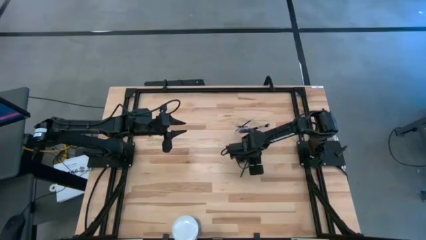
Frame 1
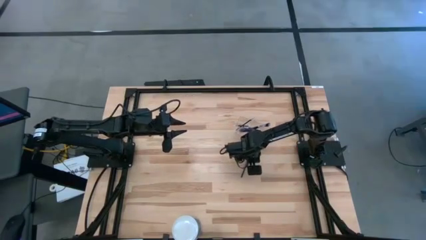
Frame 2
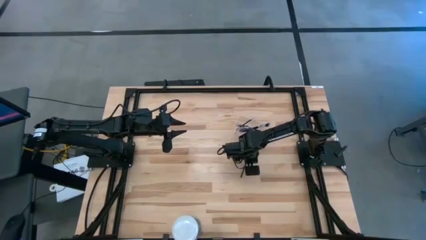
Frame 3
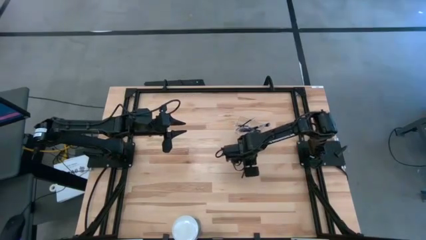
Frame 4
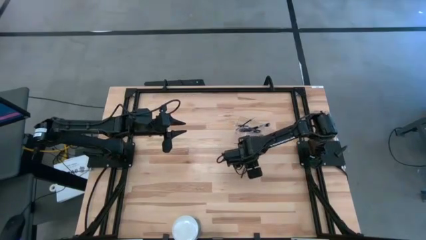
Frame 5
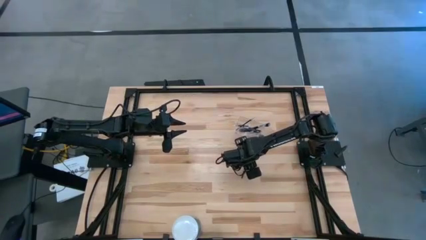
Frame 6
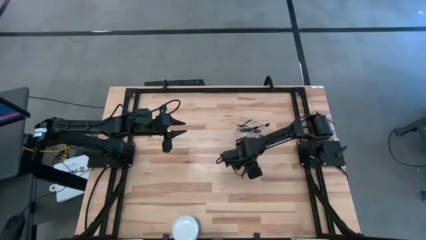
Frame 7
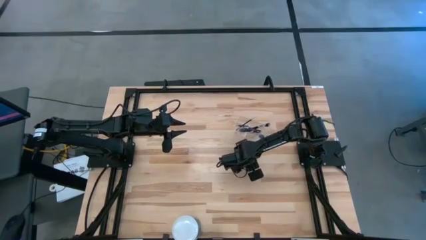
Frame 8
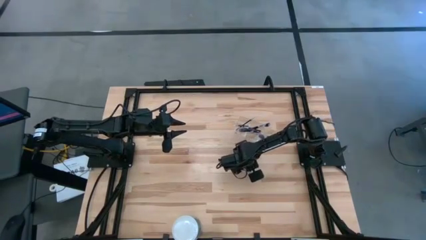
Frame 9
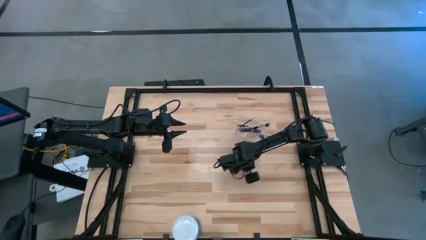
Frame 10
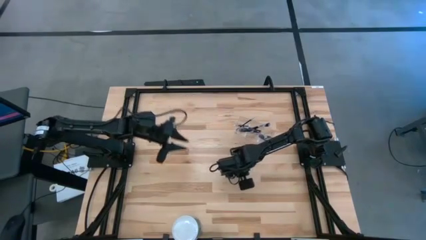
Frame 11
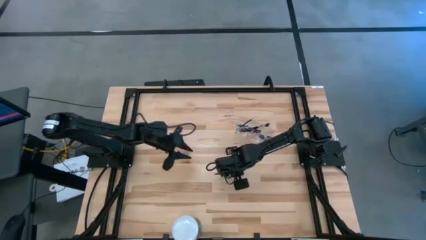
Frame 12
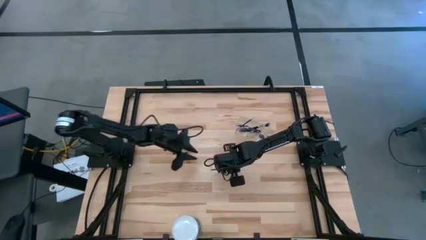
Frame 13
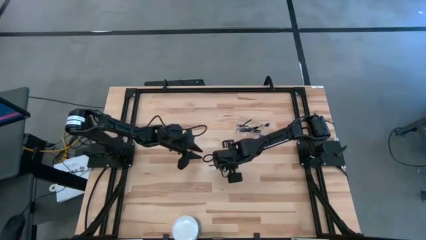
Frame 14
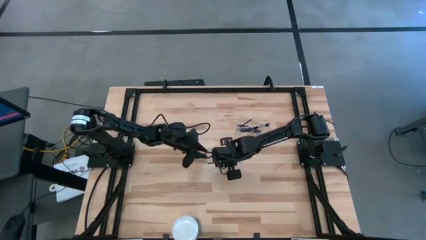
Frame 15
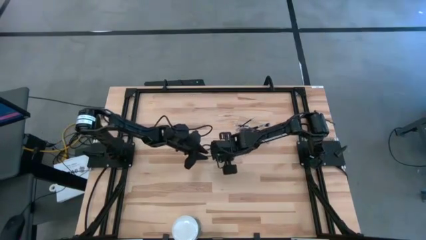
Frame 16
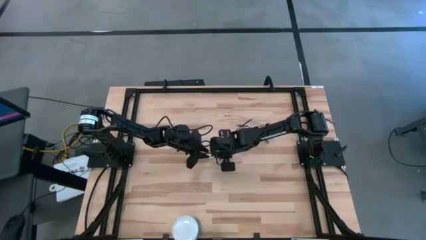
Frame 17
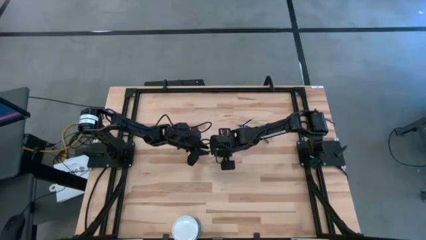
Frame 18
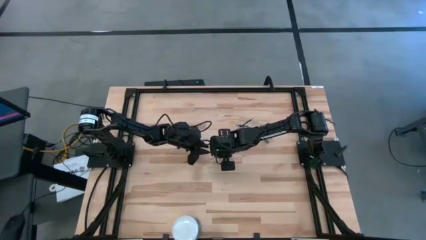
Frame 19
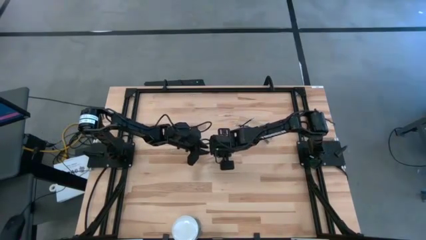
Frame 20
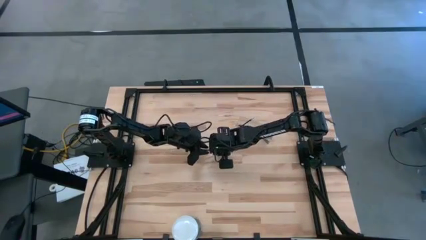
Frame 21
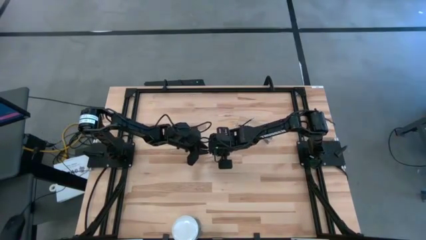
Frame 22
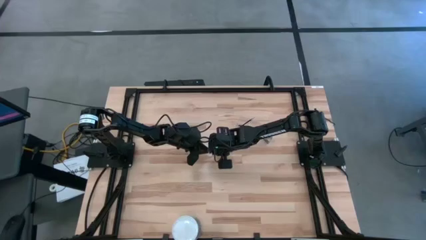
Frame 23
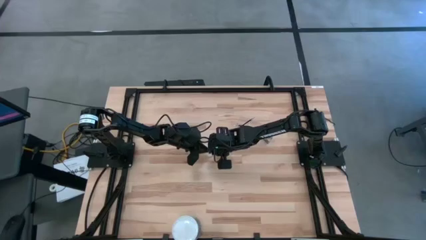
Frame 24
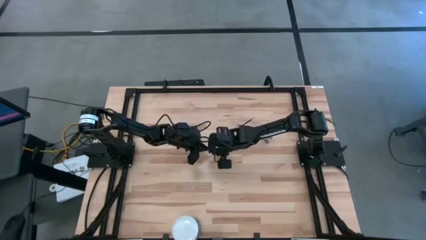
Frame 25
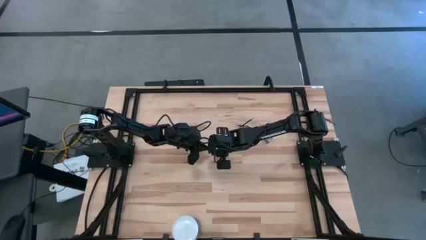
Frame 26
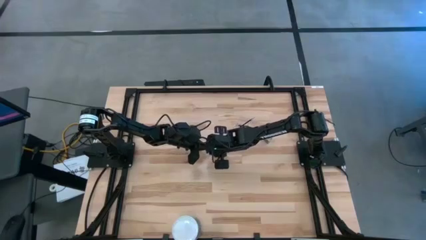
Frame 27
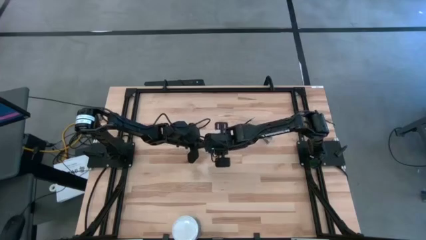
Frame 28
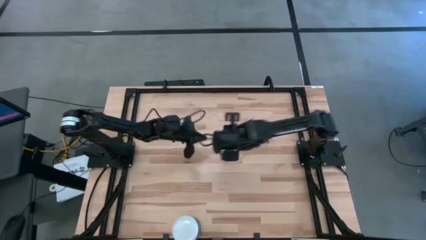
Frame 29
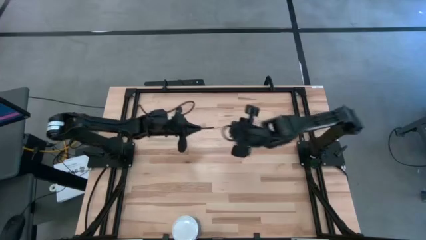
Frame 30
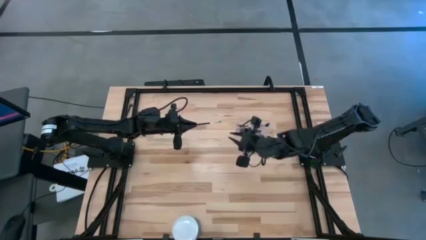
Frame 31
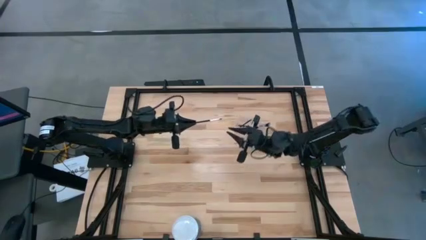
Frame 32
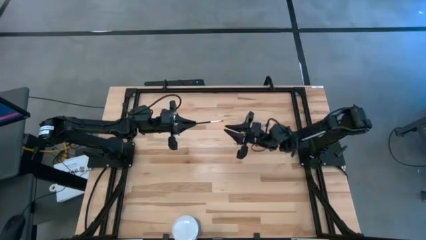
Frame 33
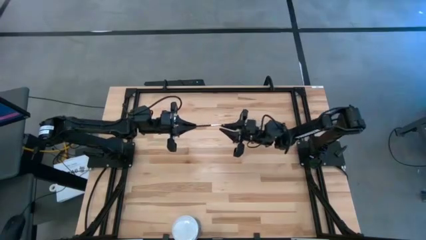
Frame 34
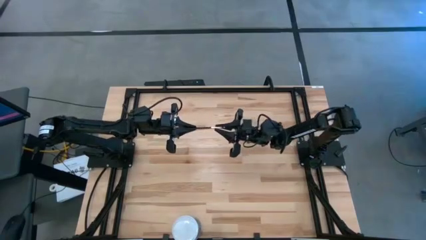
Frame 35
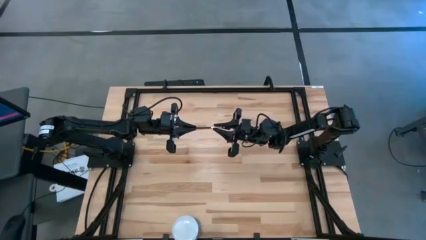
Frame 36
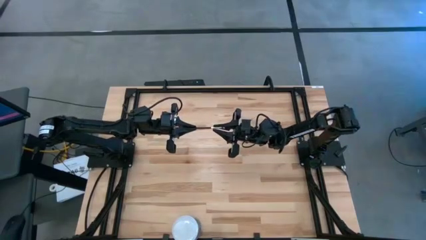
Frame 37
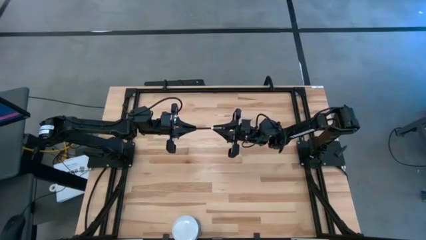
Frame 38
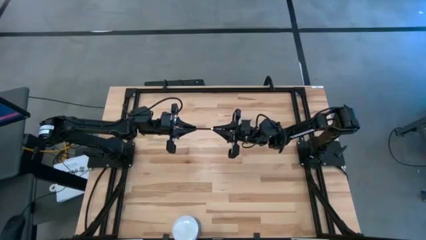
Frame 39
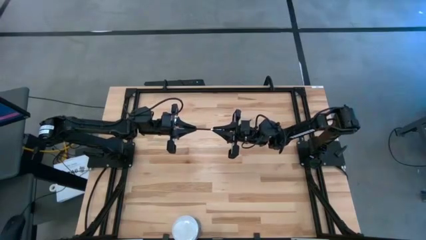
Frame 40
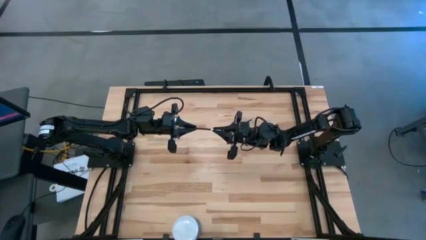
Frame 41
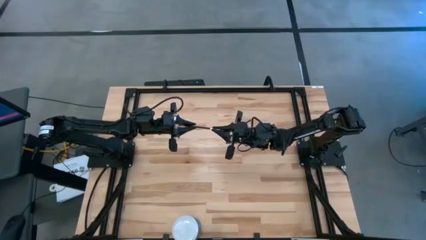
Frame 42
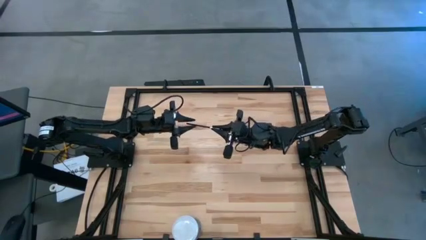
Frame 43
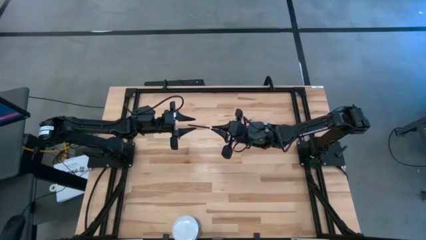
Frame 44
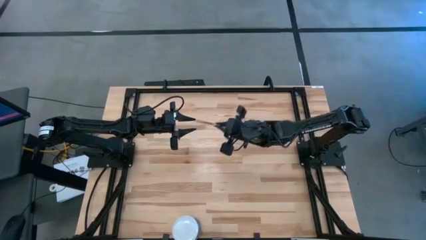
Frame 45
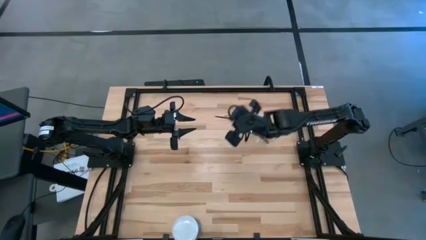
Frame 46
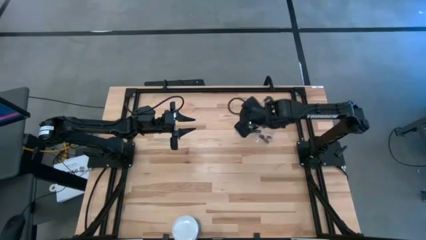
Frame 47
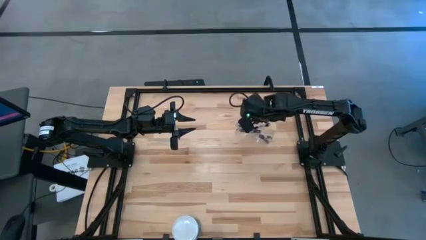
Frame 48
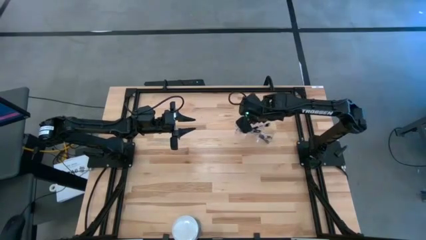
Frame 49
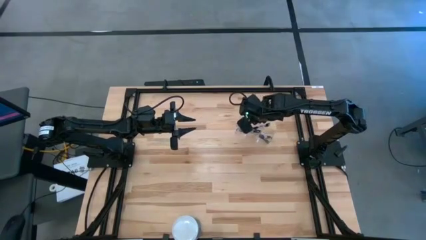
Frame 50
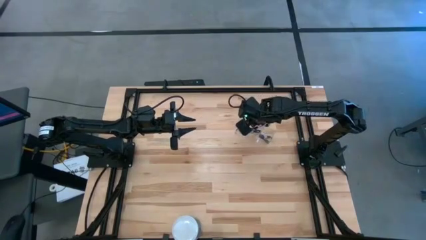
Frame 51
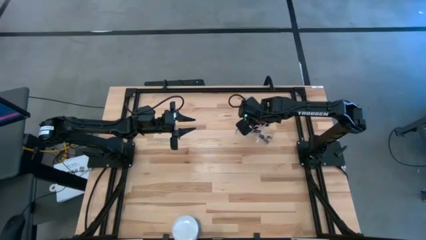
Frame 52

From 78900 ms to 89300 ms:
Task: Pick & Place Makeup Brushes
Put the black eyeshadow brush into the makeup organizer

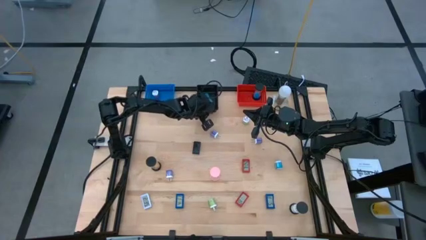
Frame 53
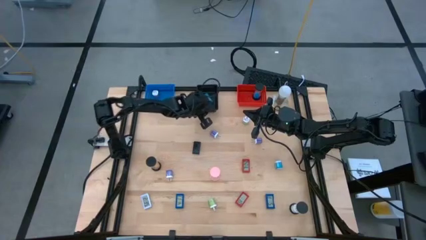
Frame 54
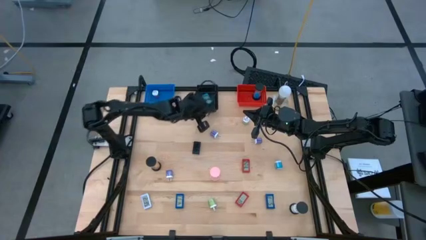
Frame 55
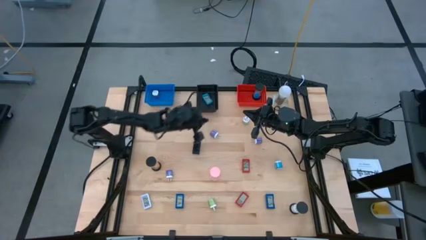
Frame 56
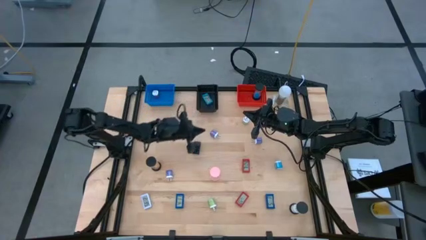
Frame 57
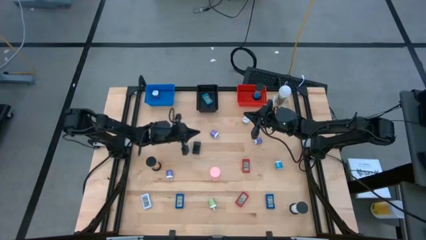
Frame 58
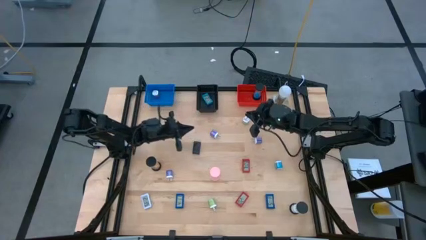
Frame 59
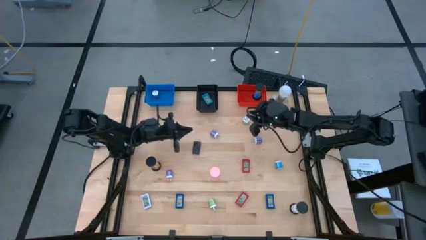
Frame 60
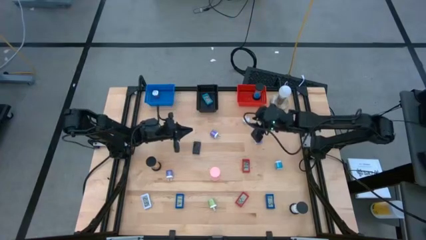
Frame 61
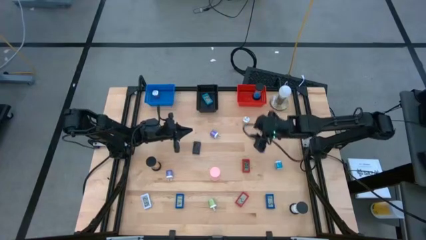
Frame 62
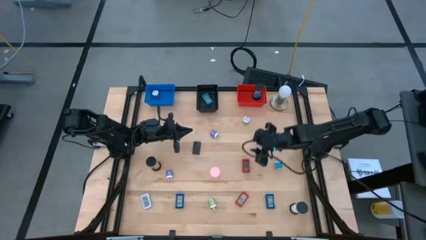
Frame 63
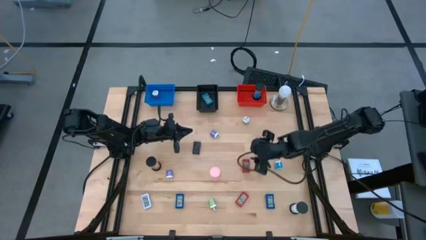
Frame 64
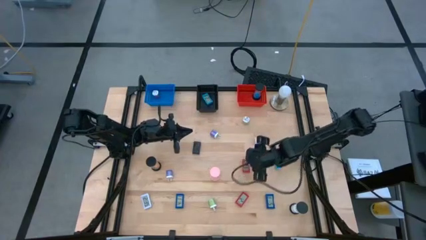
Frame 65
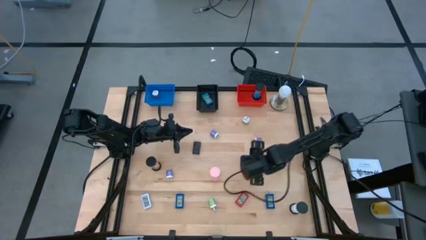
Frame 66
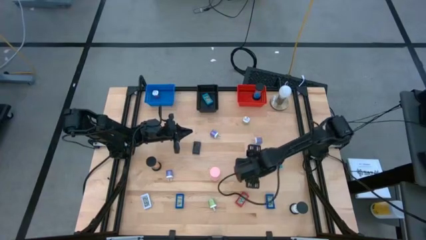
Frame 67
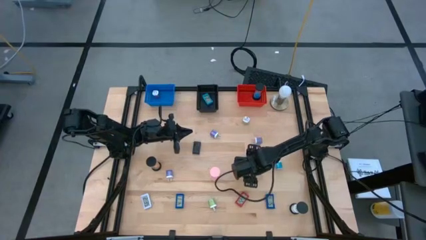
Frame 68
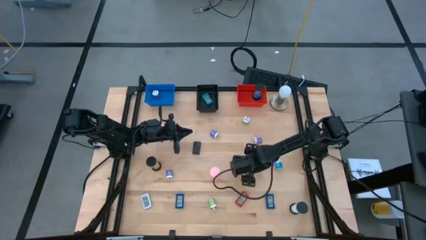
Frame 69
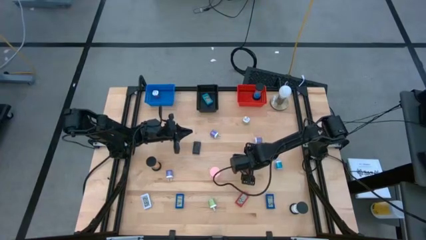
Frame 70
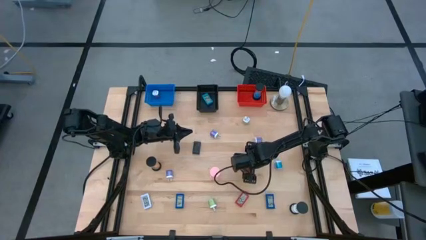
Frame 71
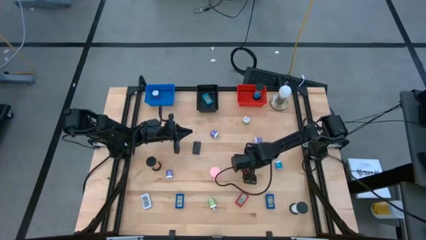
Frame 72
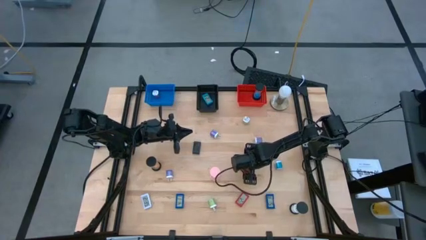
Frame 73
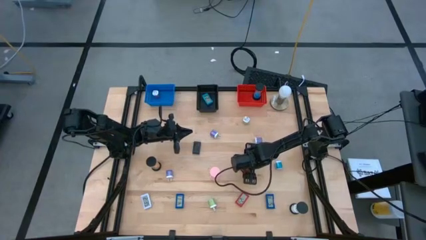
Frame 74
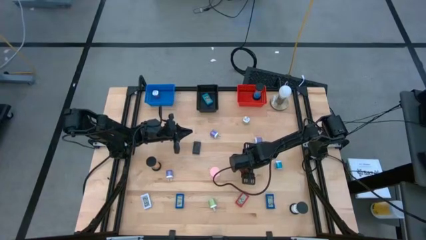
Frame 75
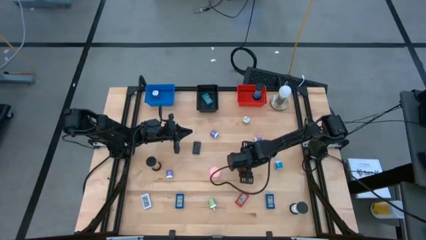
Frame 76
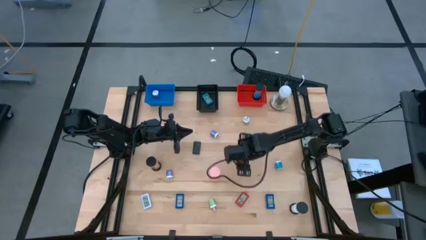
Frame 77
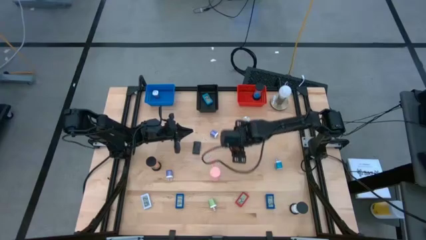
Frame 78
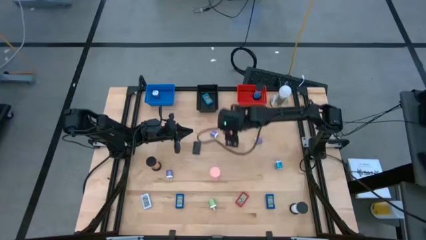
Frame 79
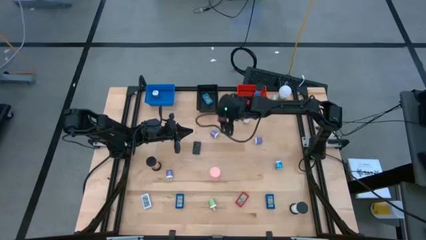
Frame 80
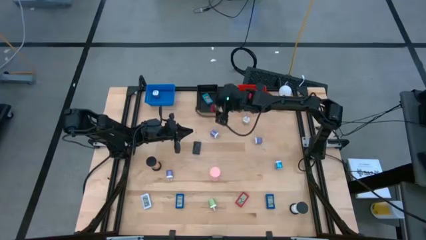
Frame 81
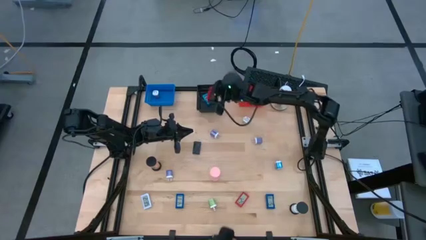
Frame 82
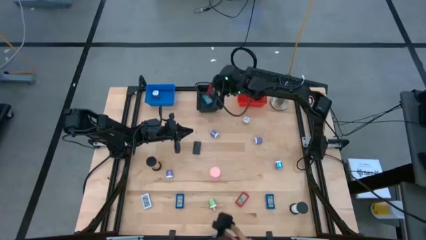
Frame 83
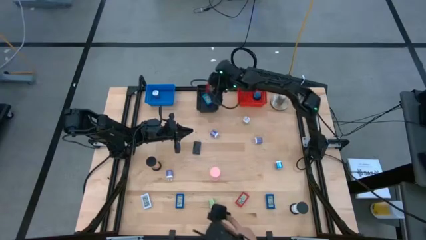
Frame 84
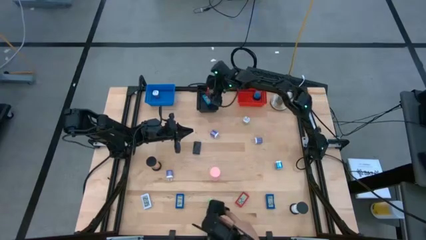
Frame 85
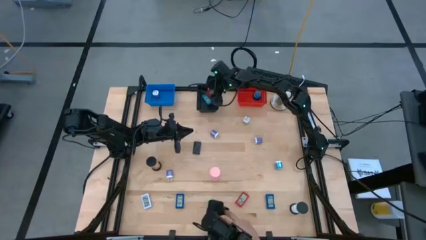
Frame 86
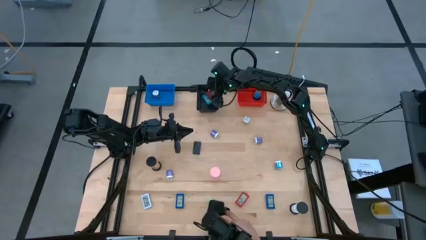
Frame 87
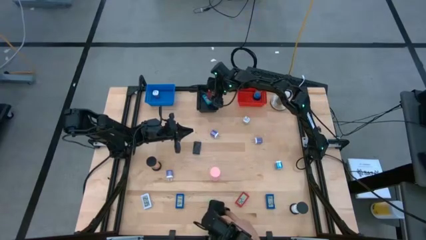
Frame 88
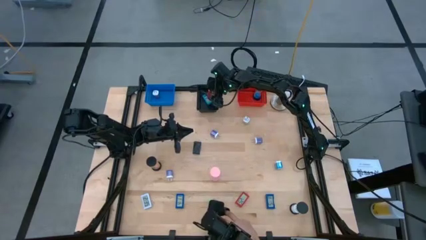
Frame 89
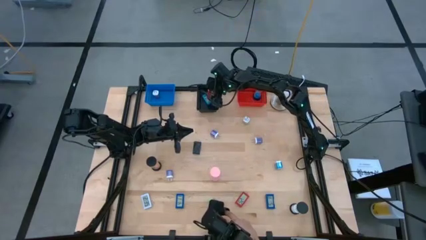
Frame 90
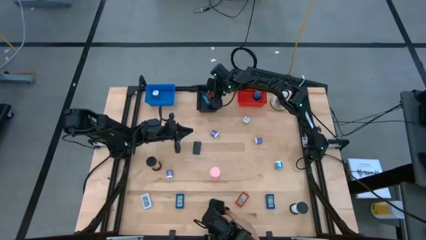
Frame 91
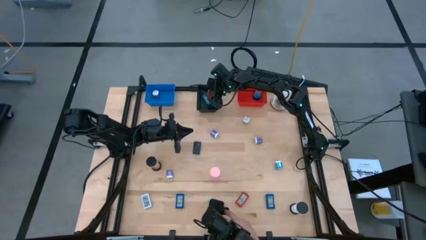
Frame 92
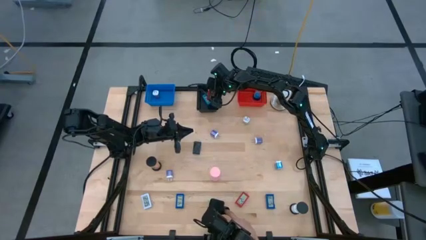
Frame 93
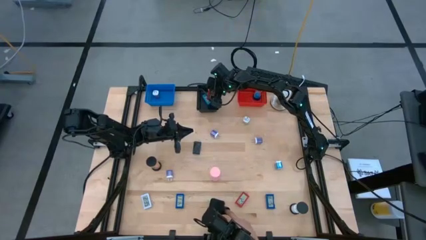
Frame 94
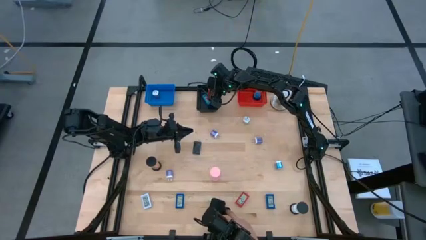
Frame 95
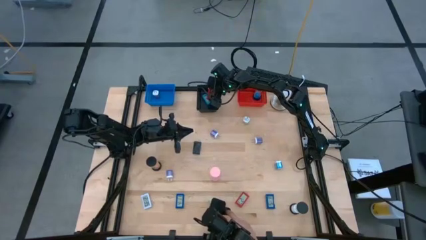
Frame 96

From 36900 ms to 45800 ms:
Task: Pick & Place Office items
Put the top red digital clock into the black bin
